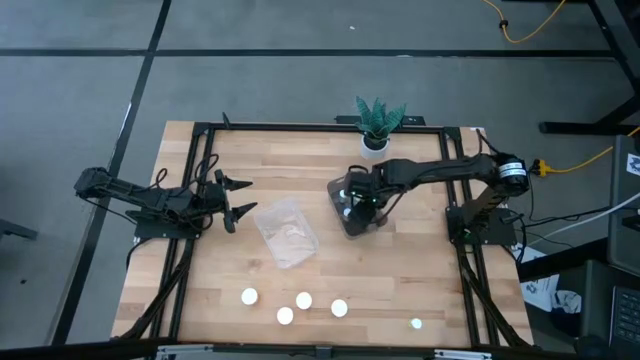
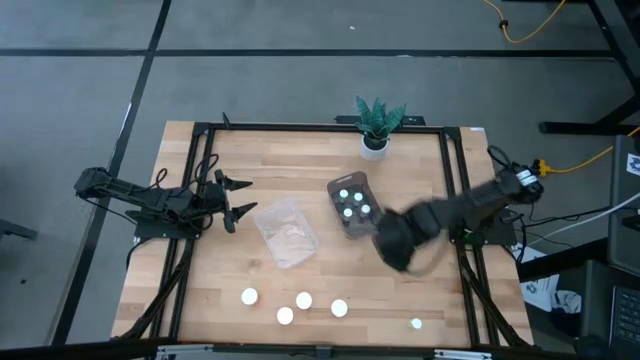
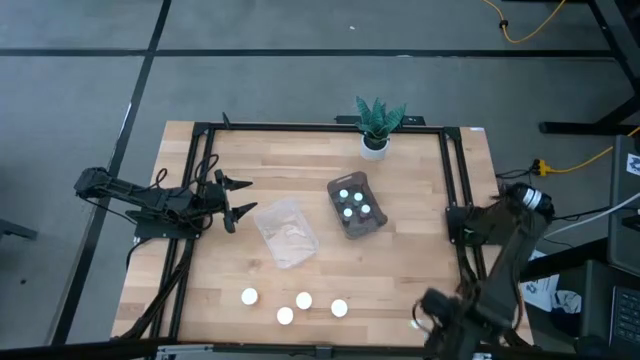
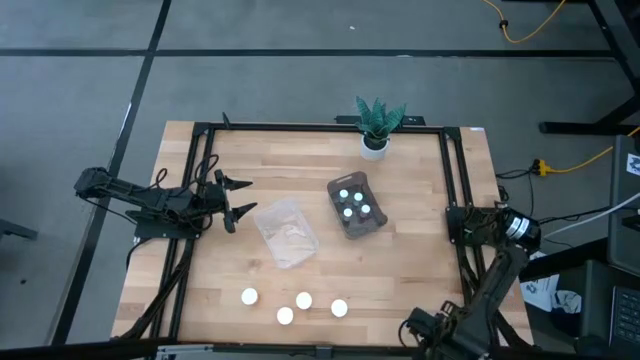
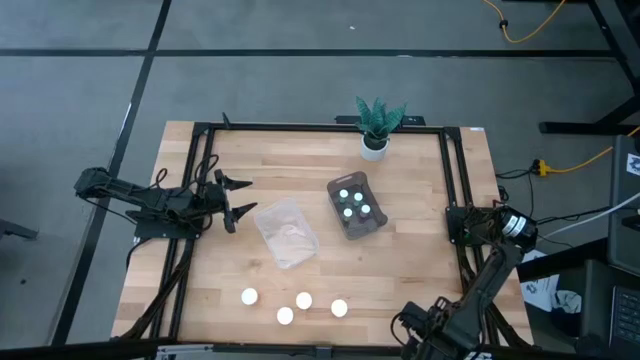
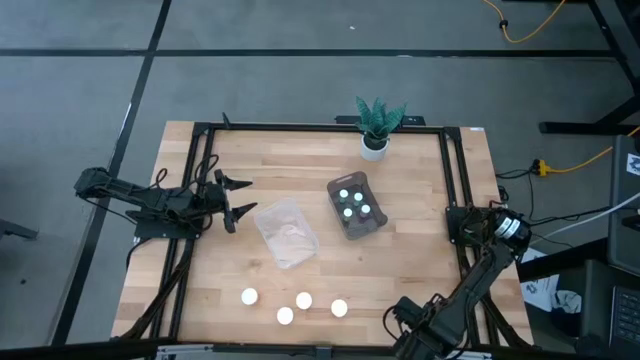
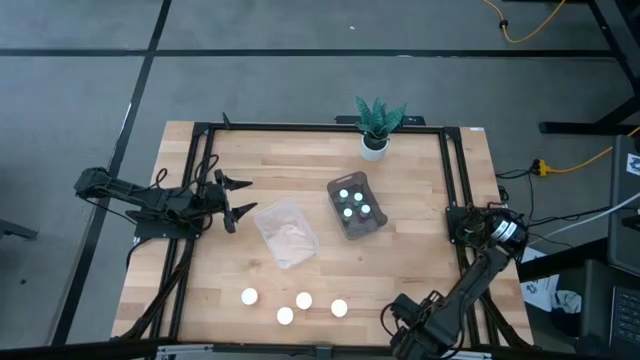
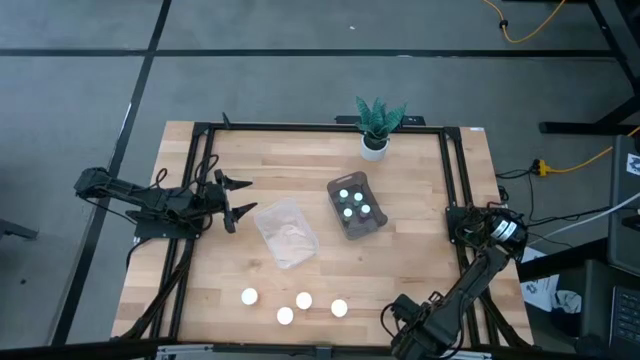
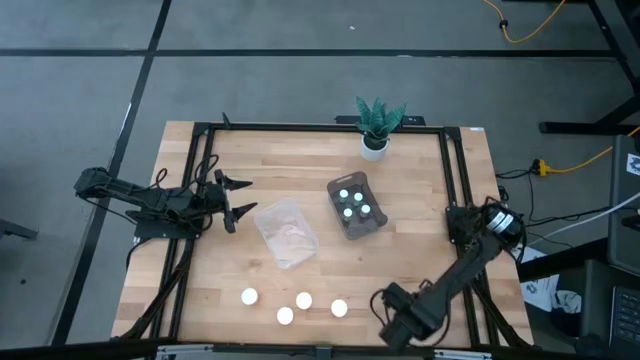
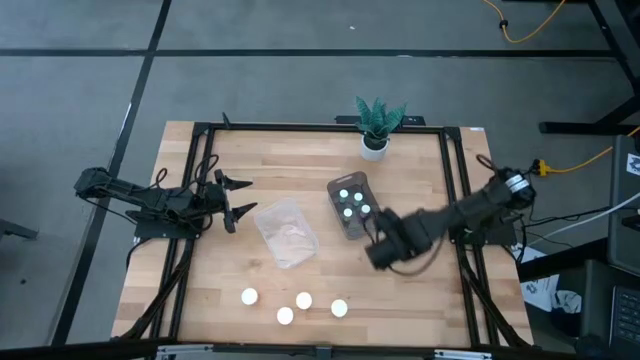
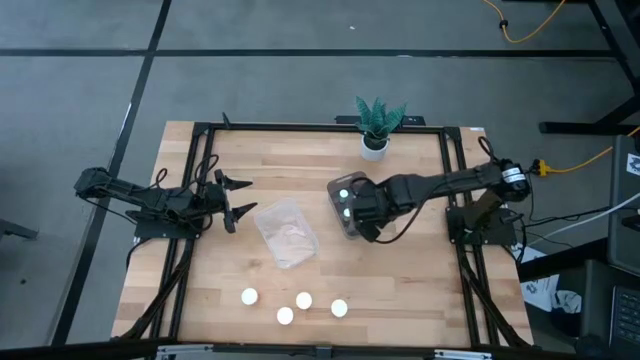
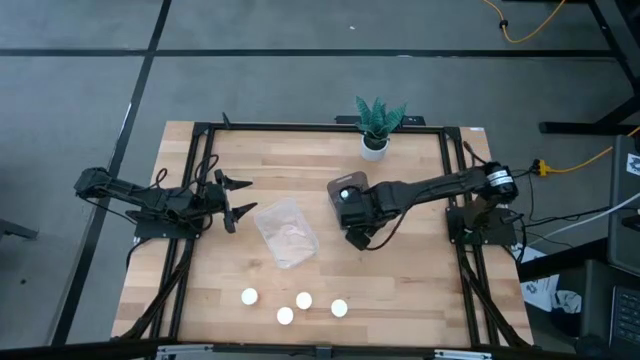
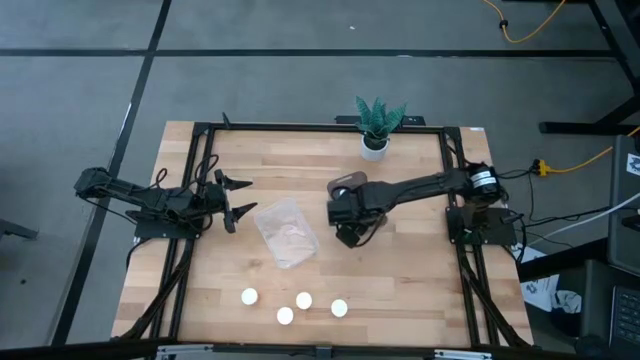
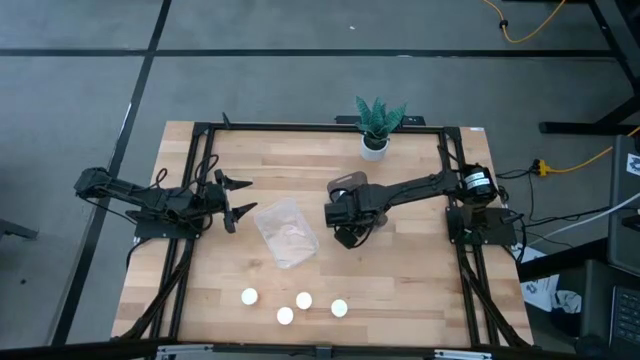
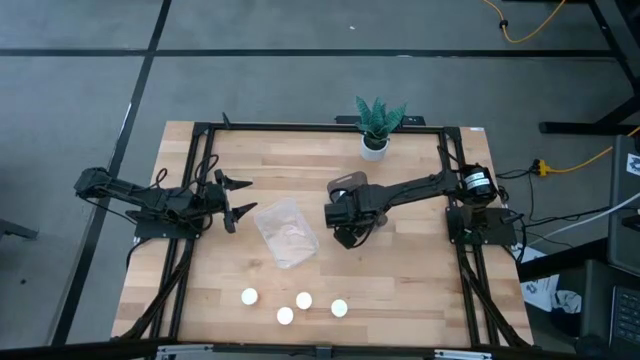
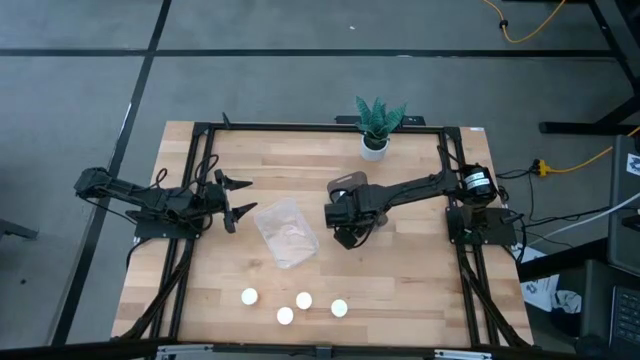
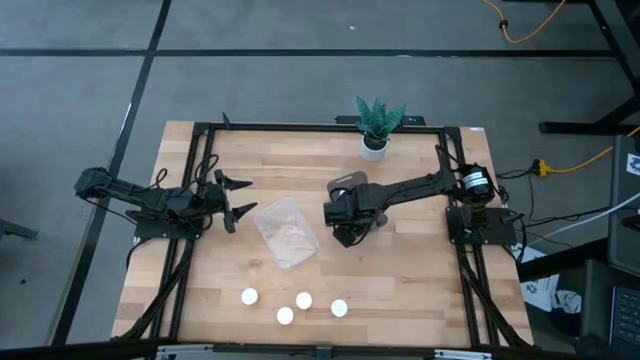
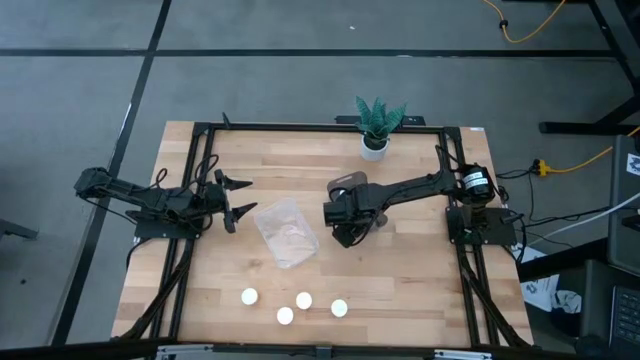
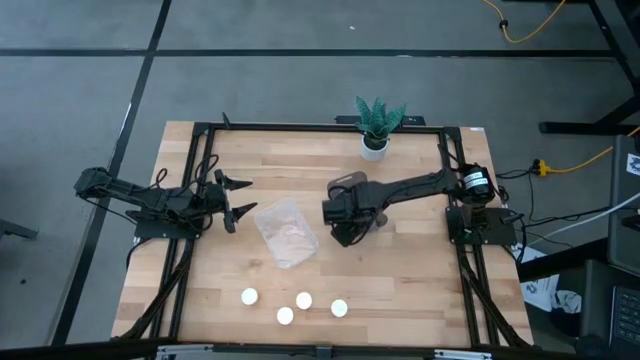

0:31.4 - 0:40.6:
Task: Pick and place medicine bottles into bin by pill shape (circle, oval)
Put the small yellow pill bottle into the black bin

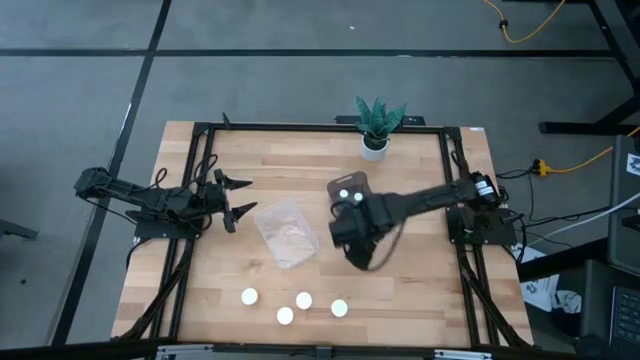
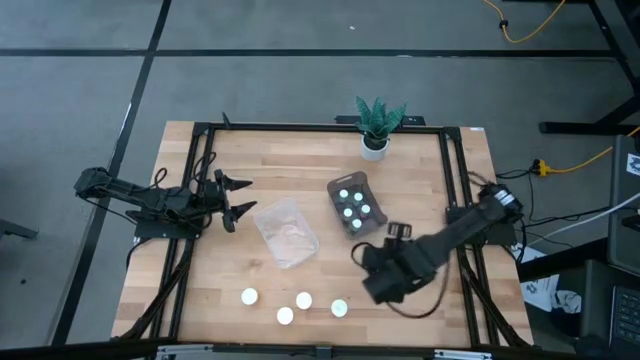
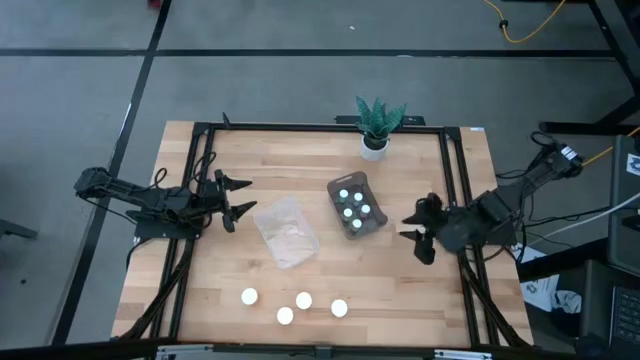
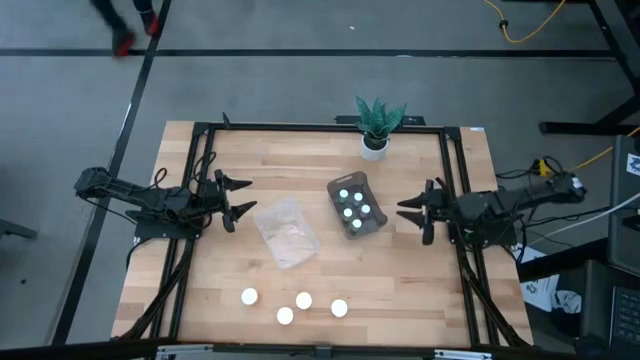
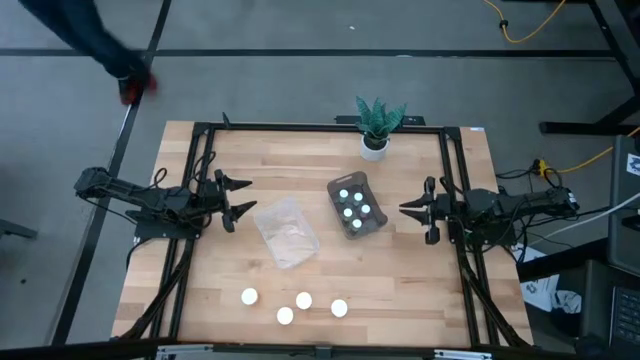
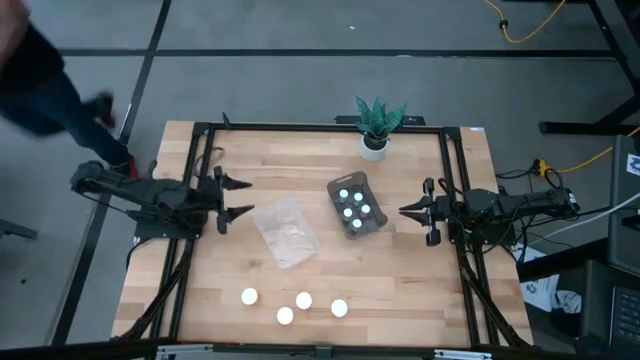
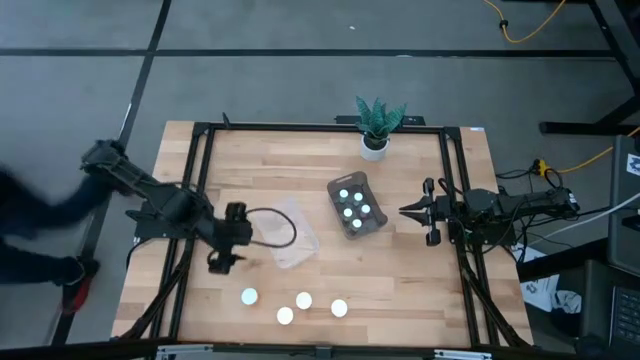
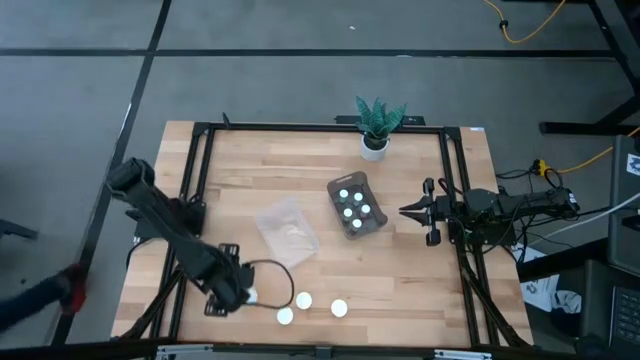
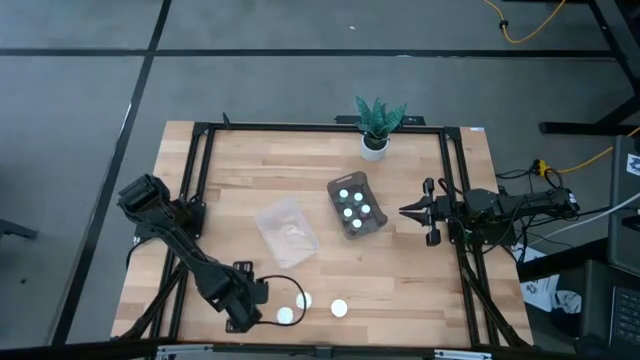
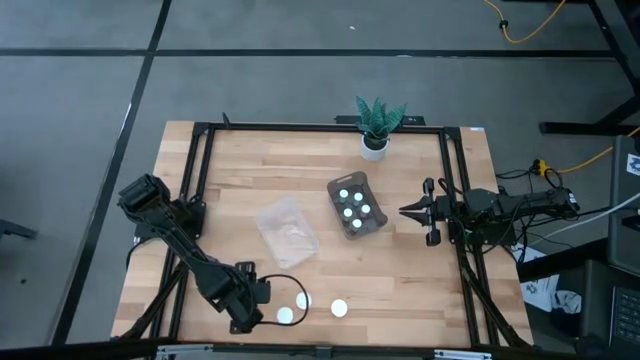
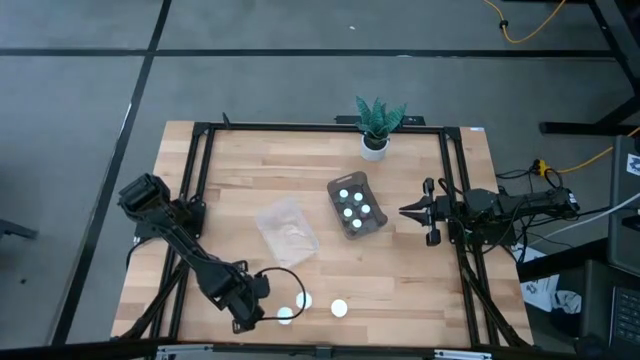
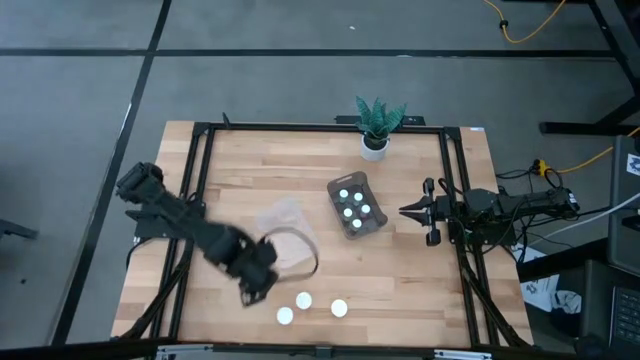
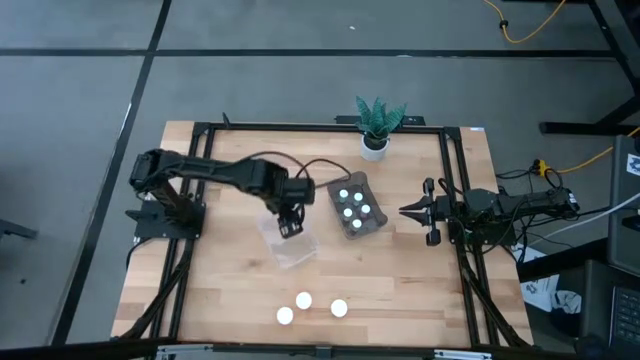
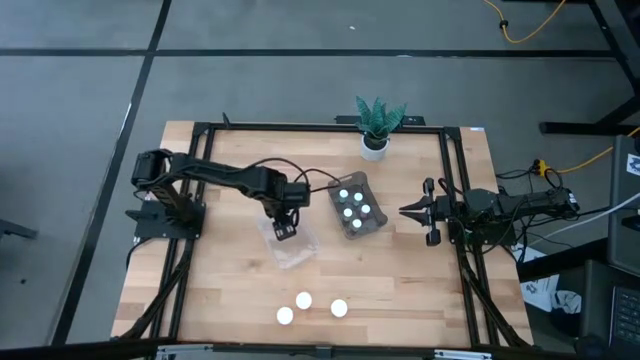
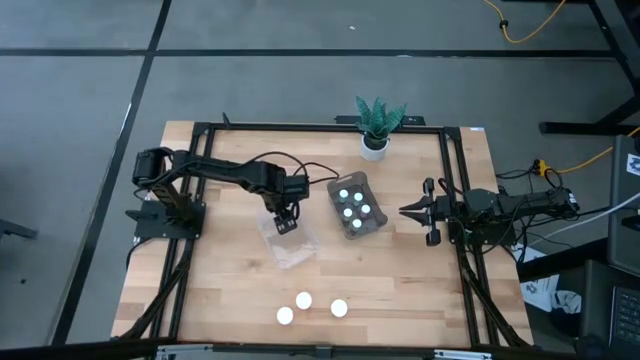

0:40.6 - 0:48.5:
Put the large orange pill bottle into the transparent bin

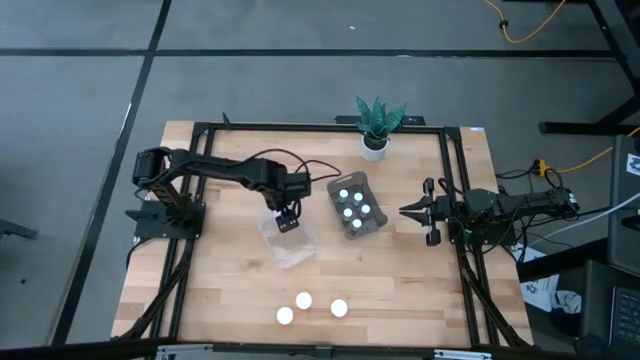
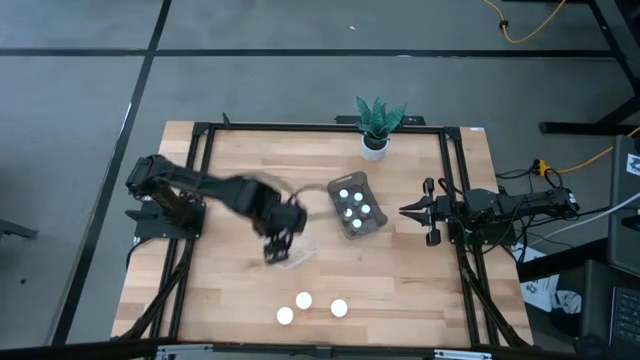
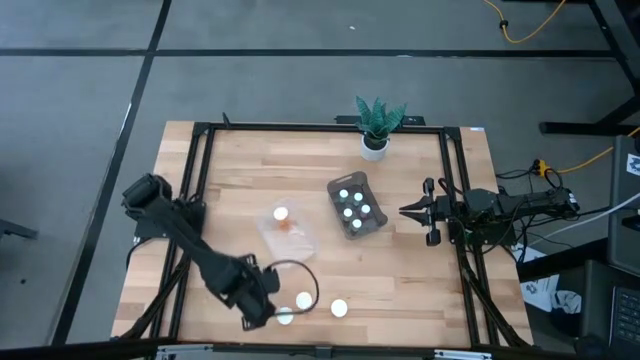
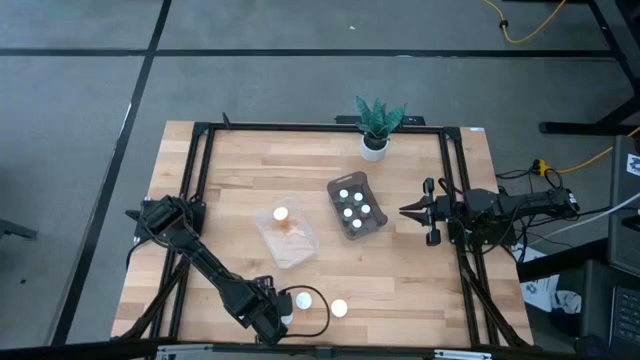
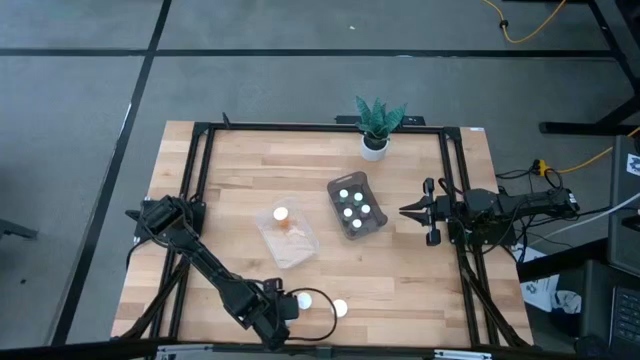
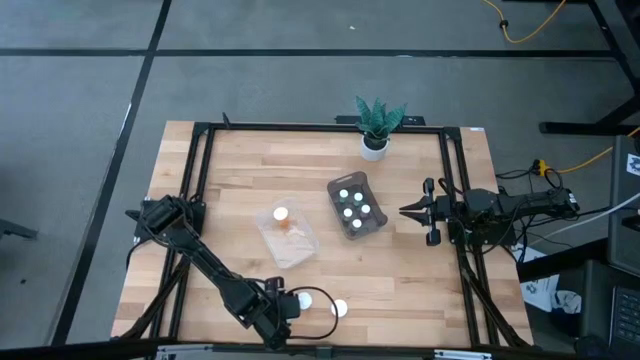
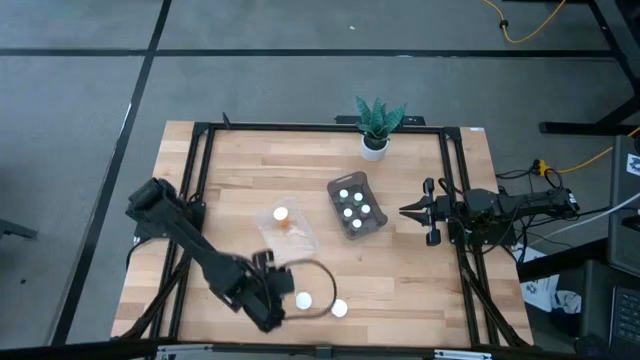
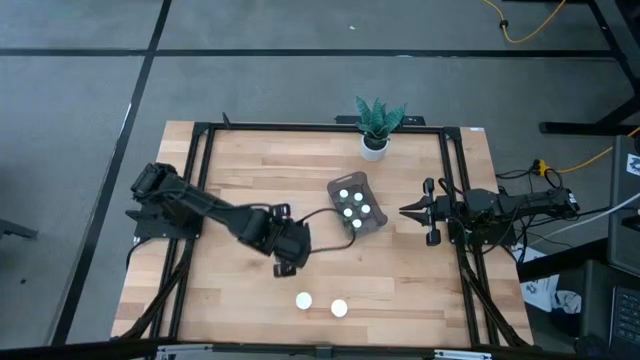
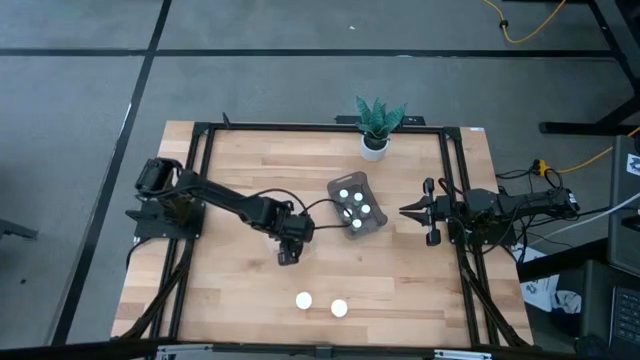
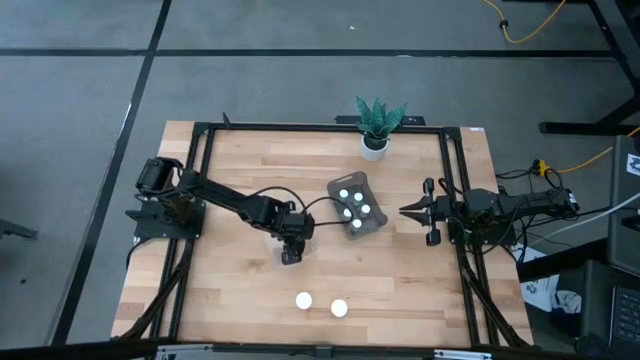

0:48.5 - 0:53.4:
Put the large orange pill bottle into the transparent bin
